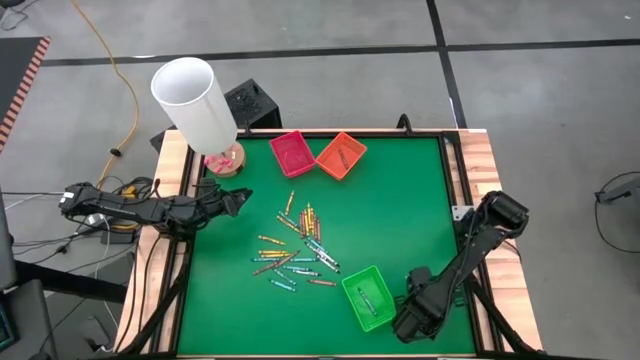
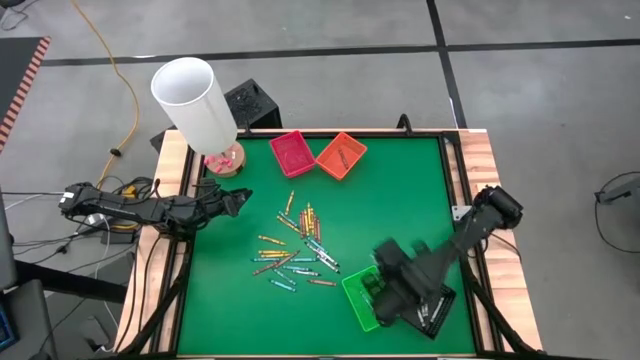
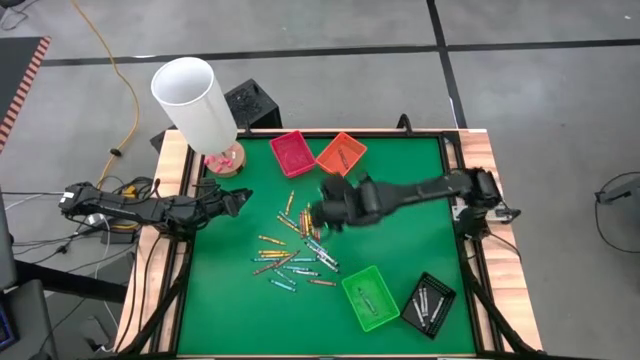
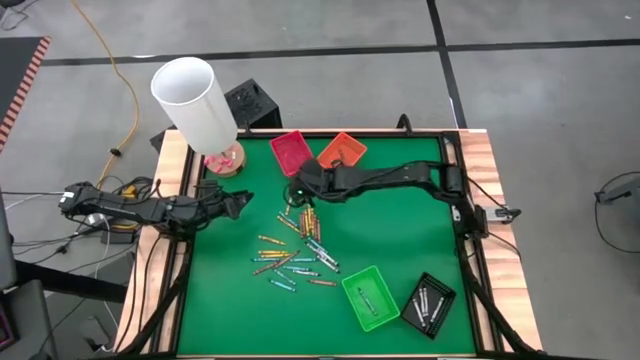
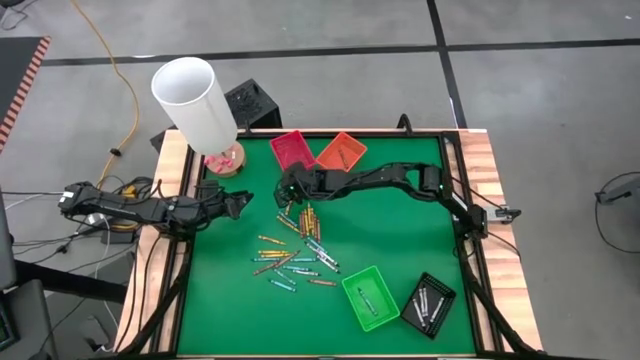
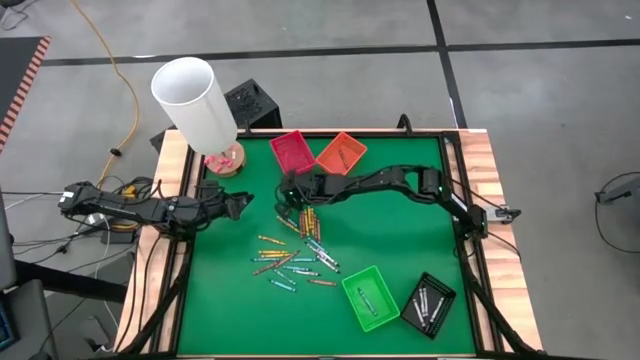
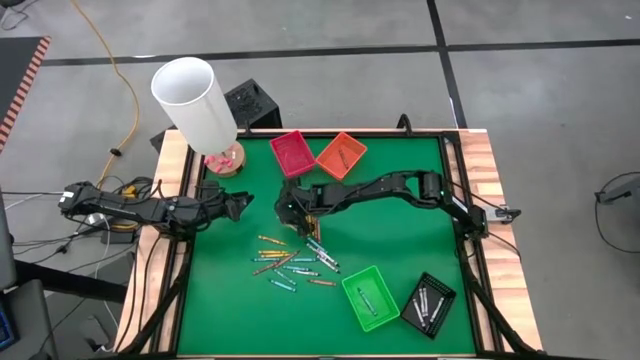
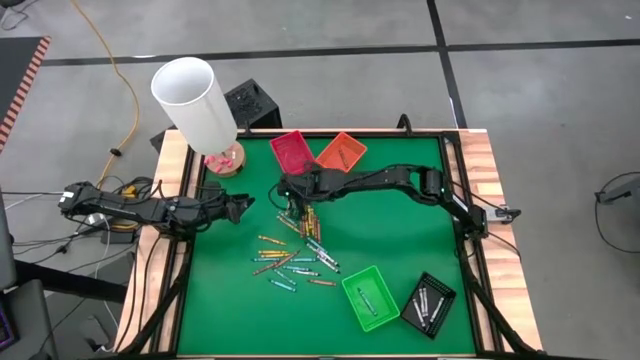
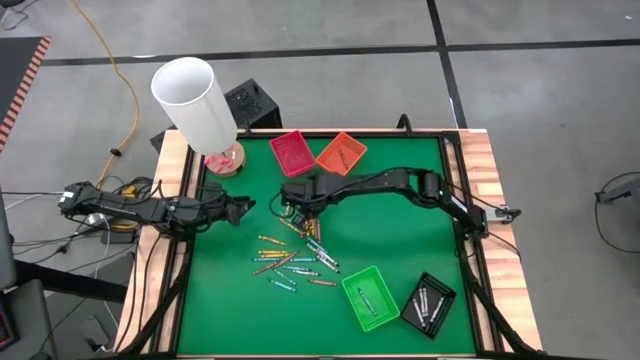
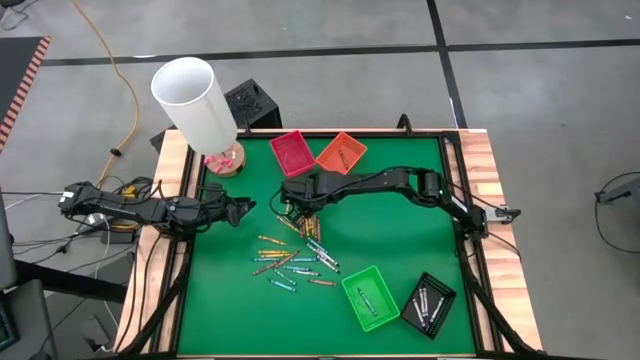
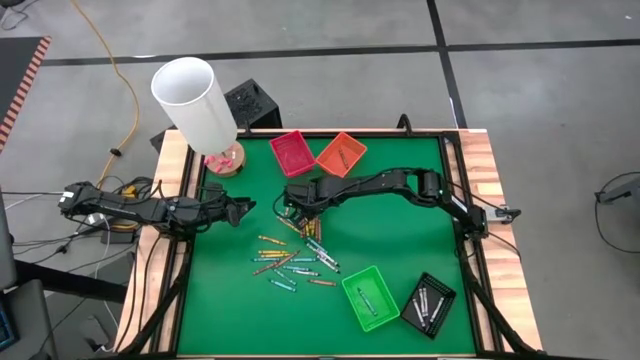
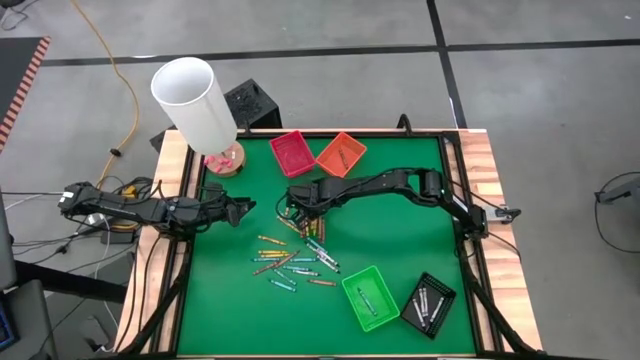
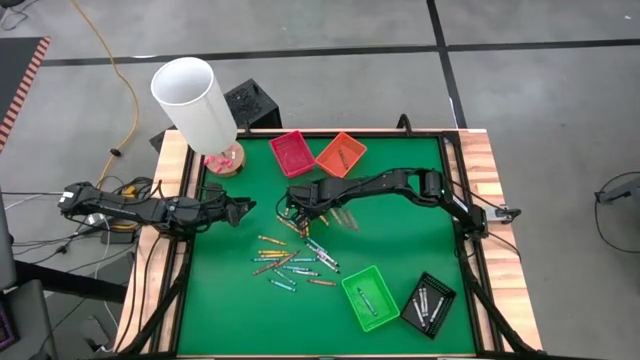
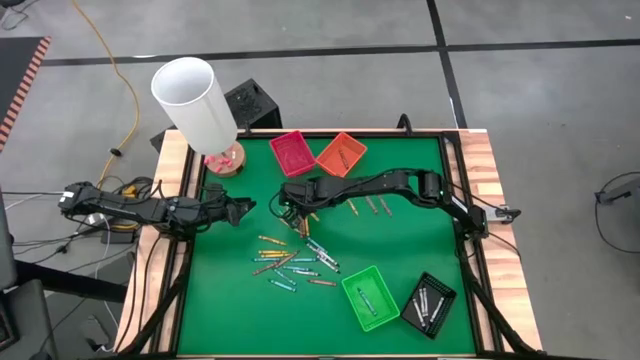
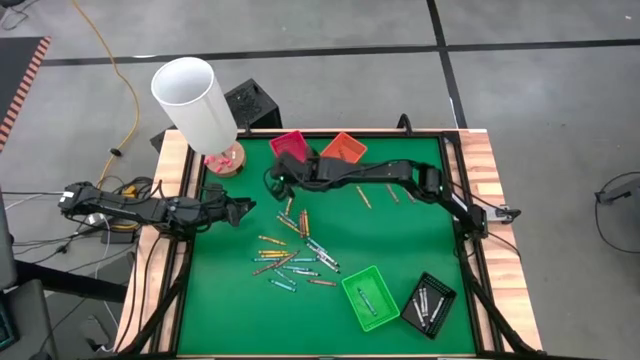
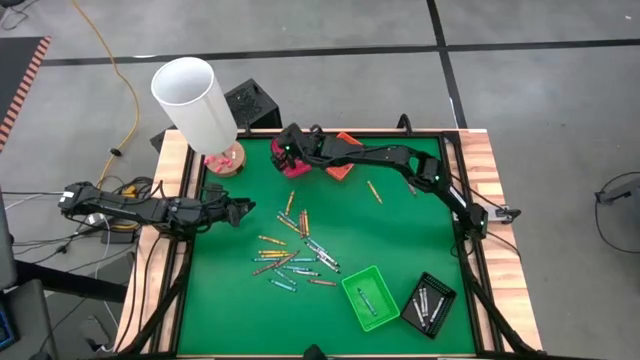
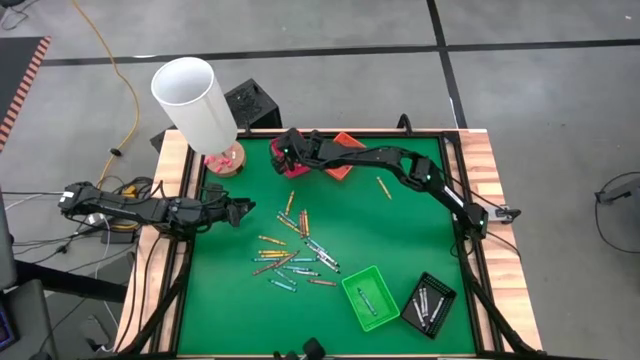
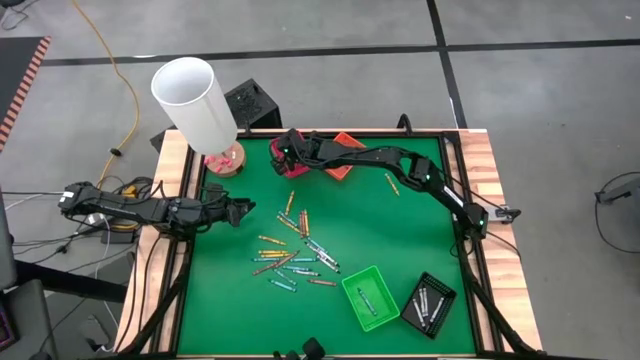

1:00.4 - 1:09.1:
Task: Sort crayons
Put the light green crayon into the red bin

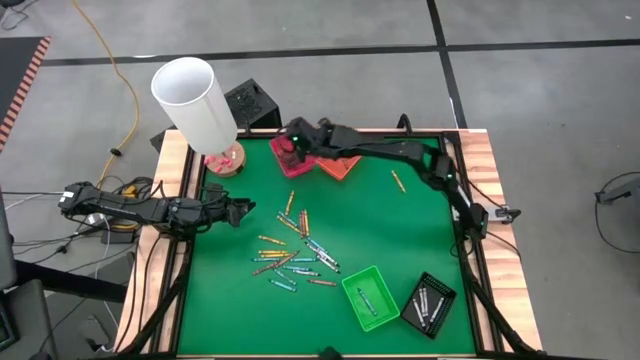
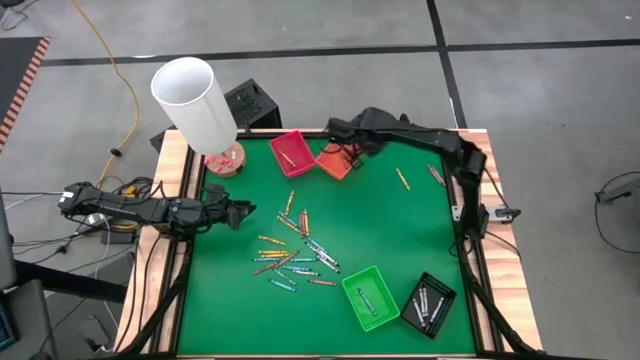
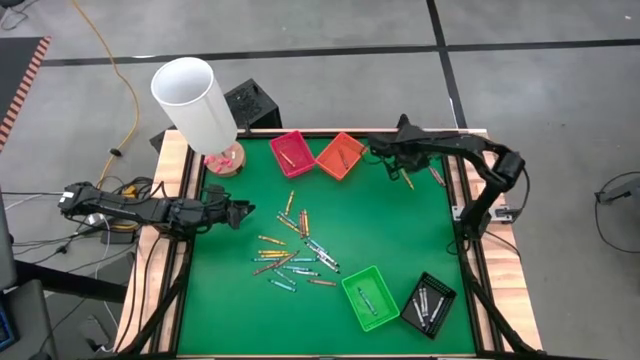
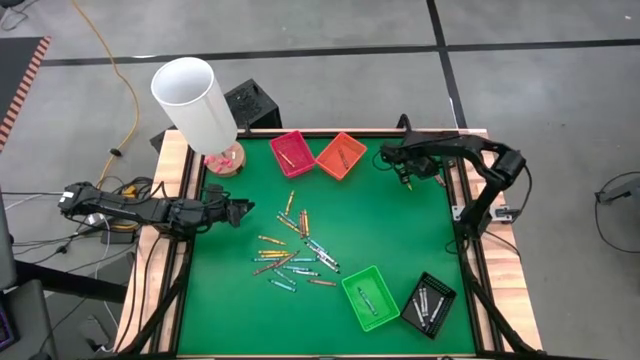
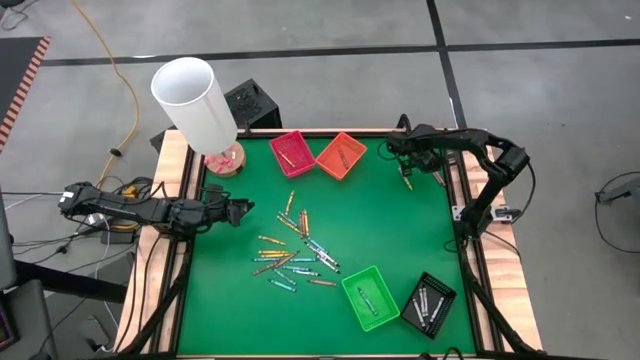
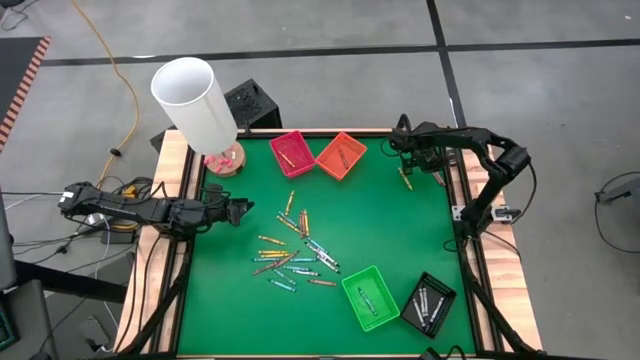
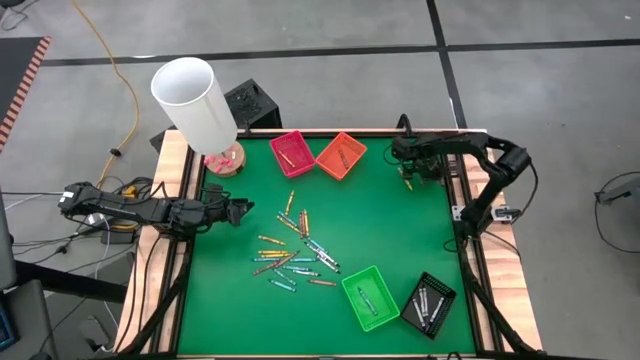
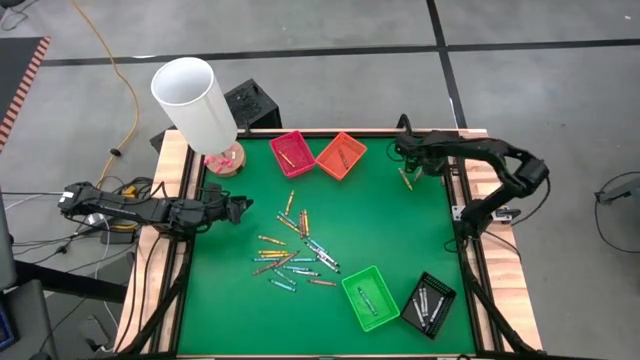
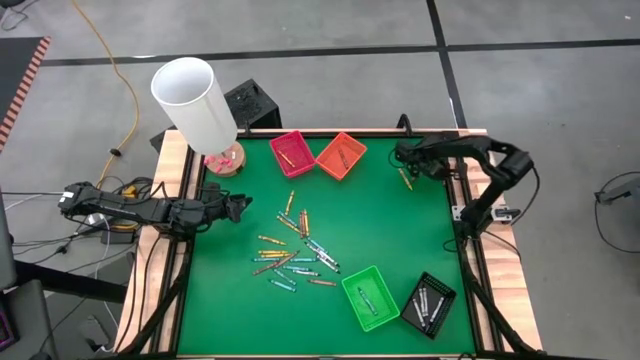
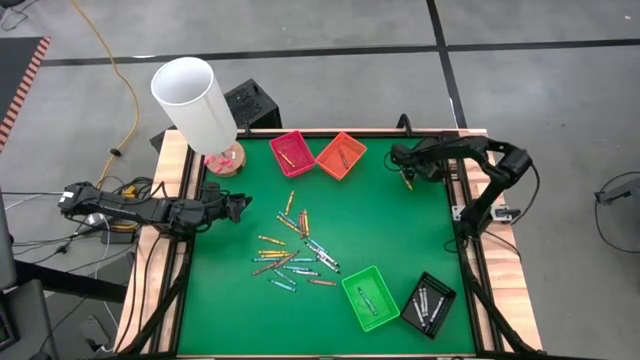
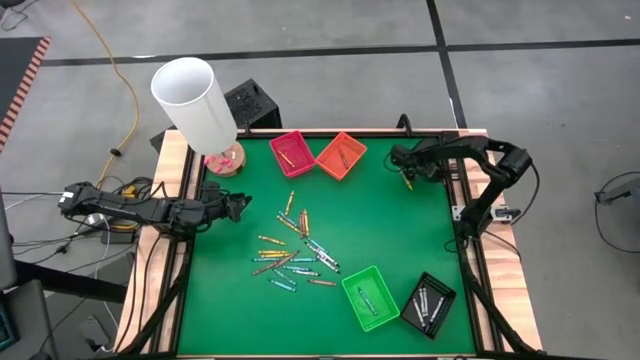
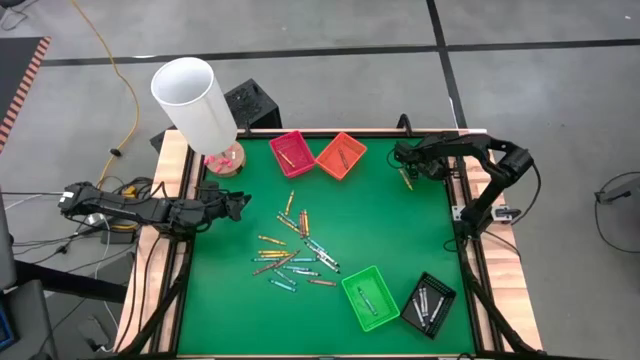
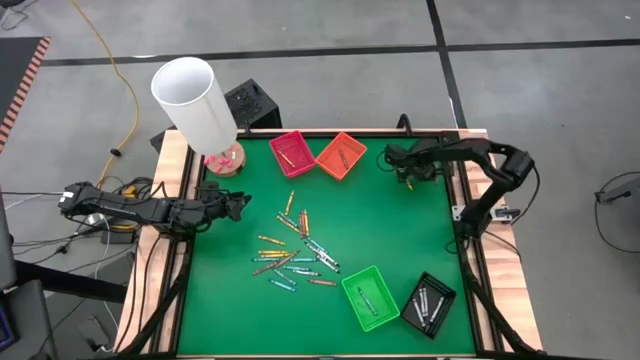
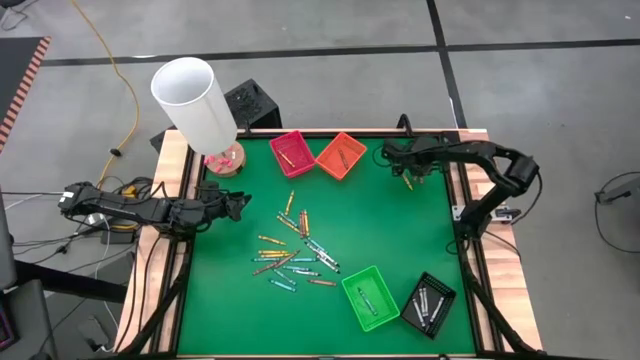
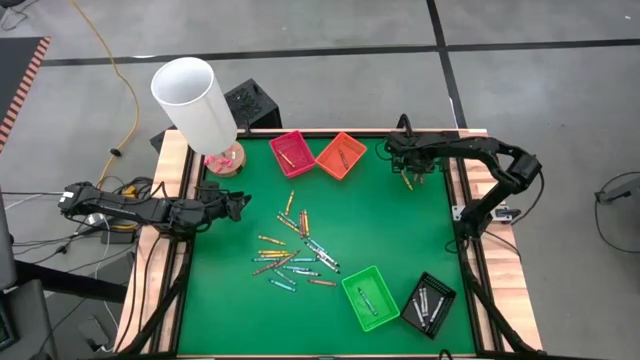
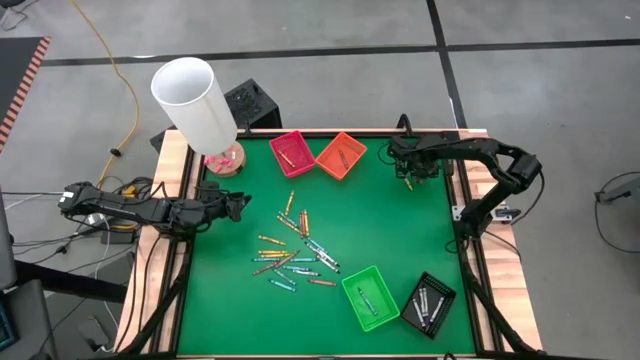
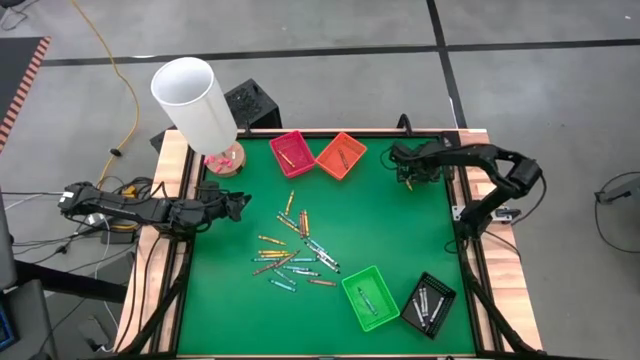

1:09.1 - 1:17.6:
Put the brown crayon into the orange bin

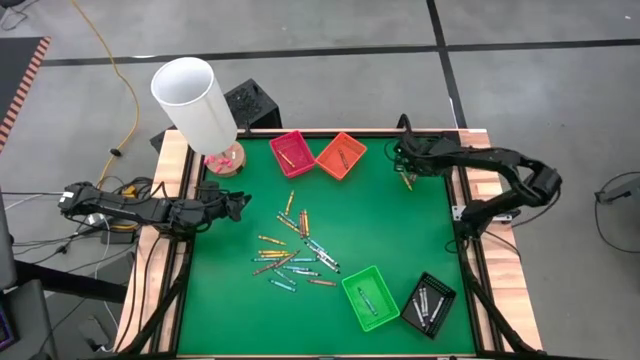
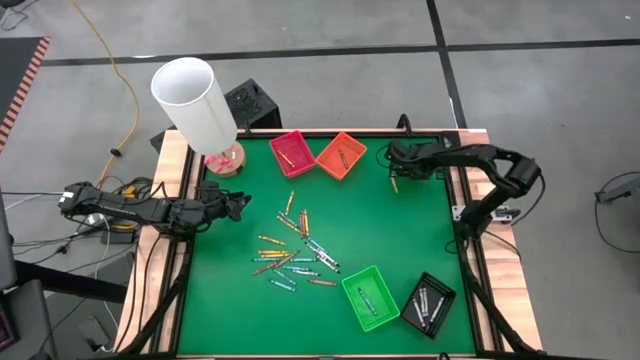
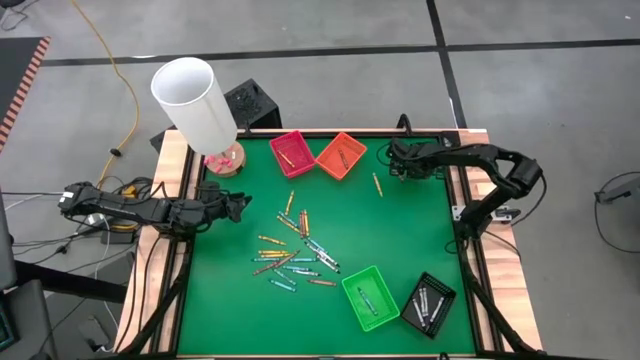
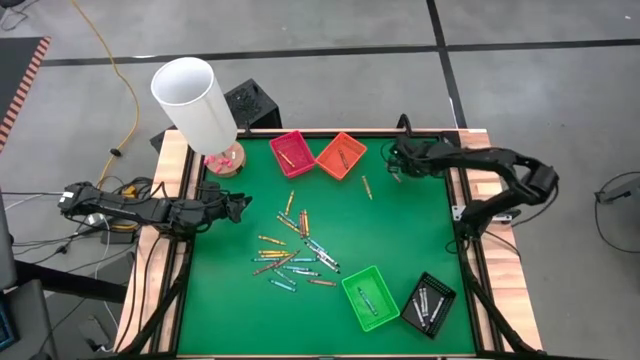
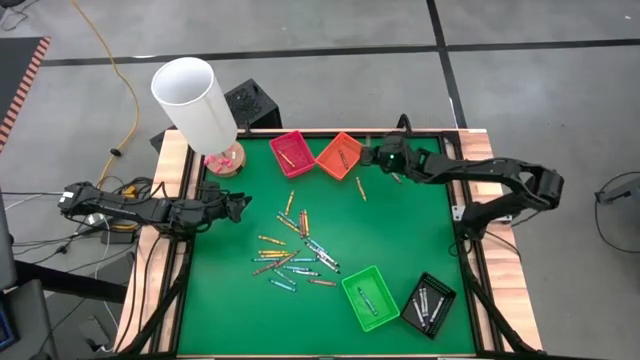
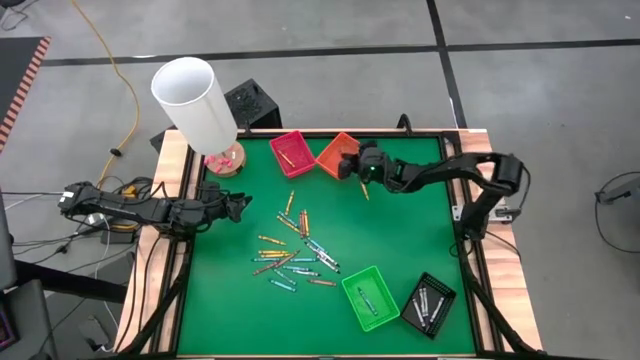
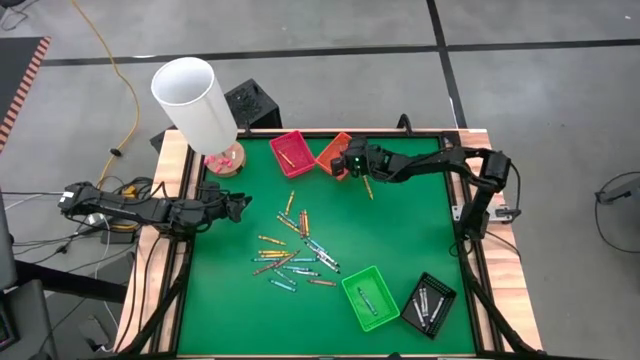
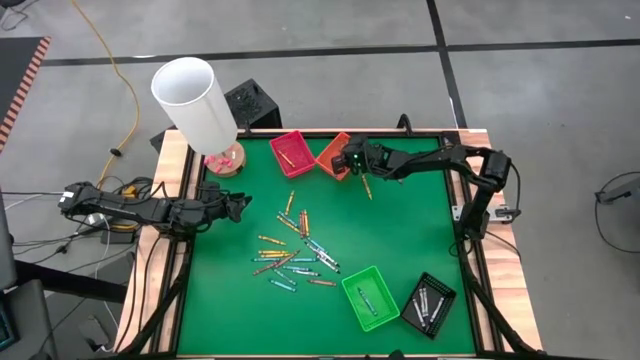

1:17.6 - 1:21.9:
Put the brown crayon into the orange bin
